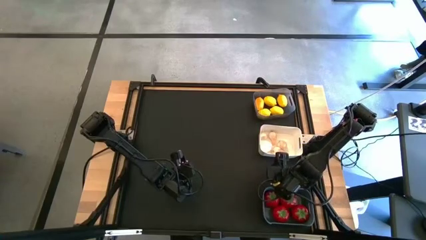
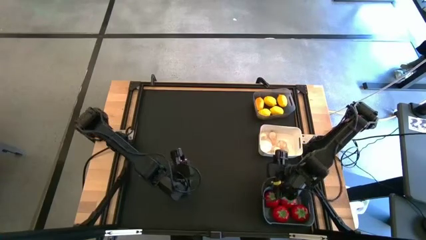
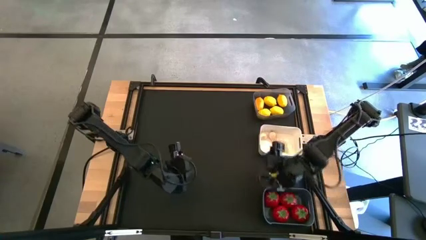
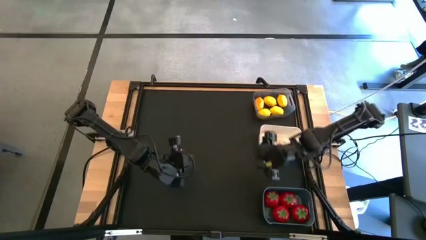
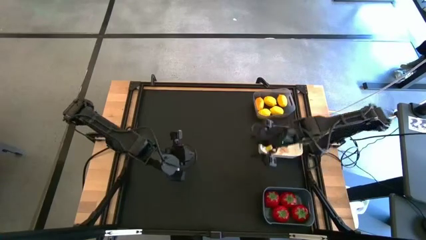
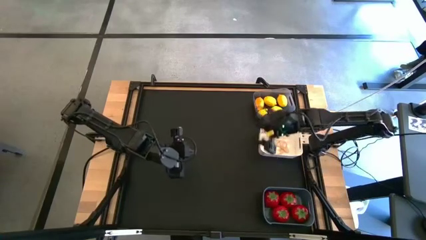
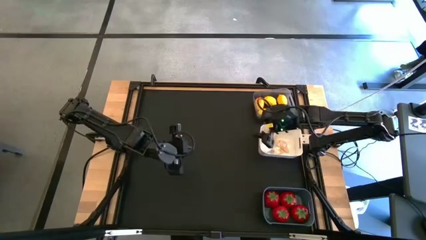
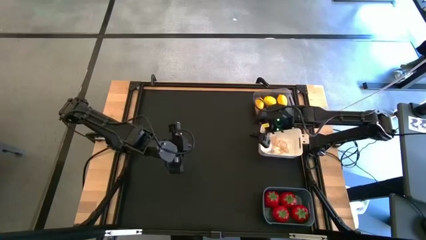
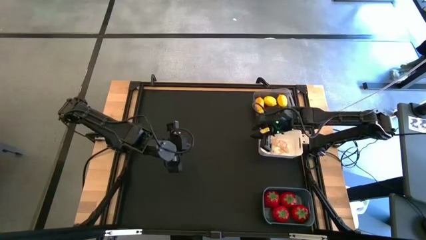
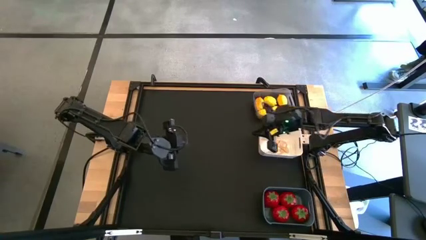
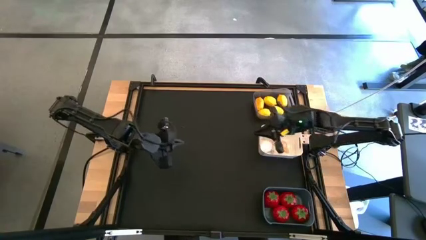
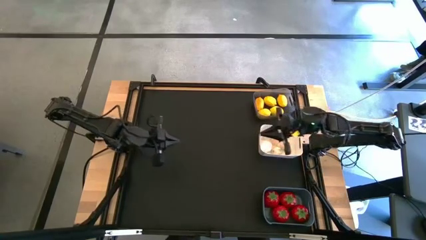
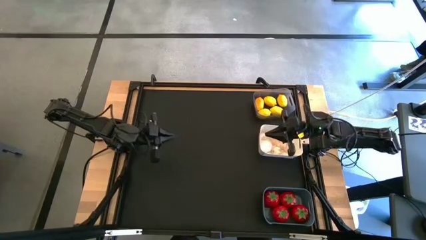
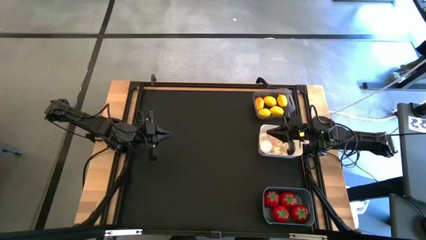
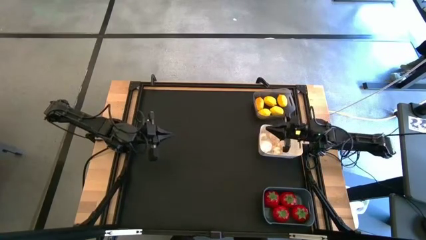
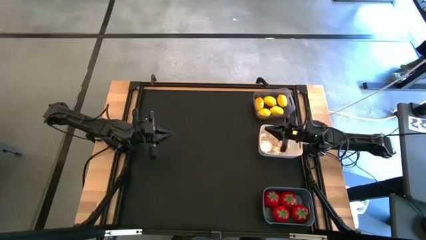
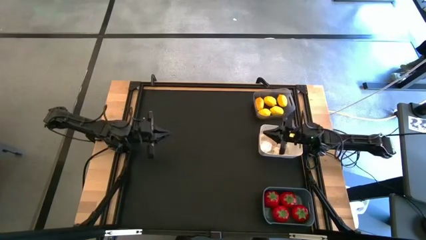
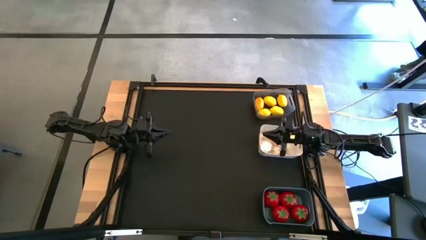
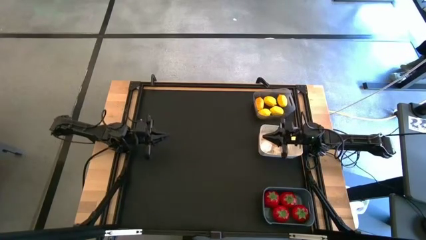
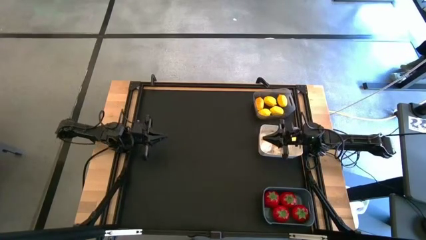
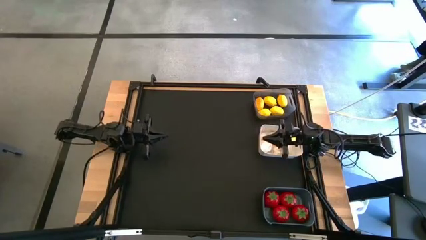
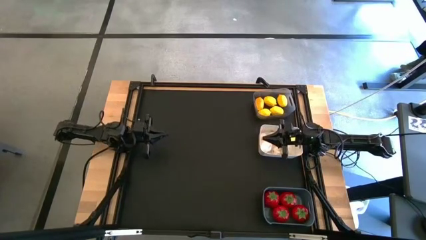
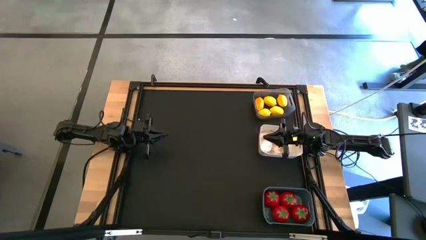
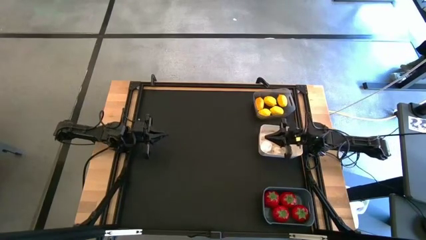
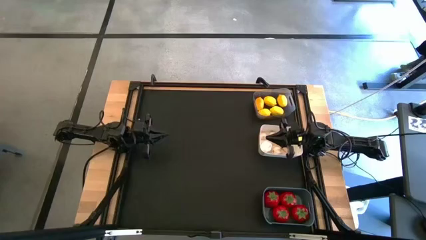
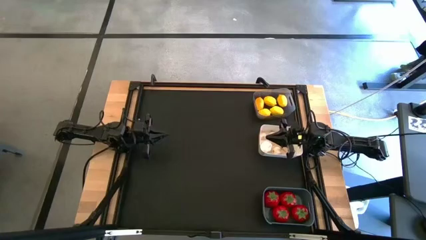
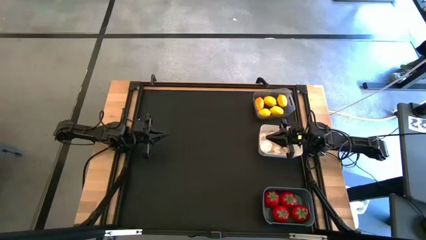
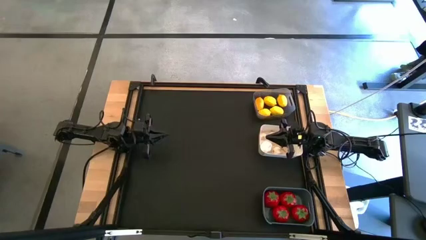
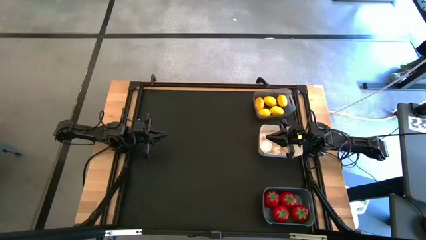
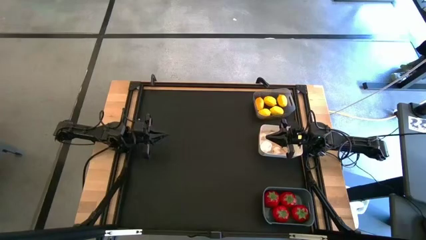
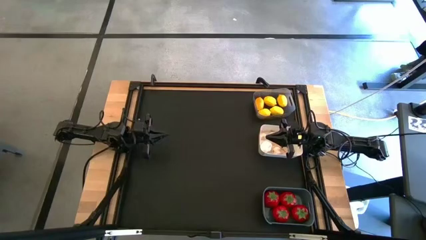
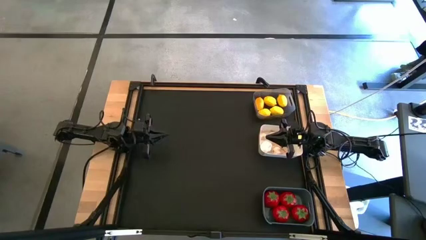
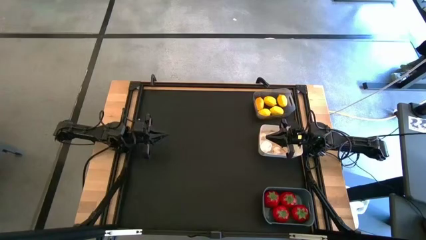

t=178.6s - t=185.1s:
Task: Sort produce into baskets
Return to Home Position

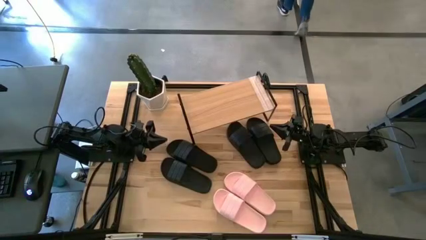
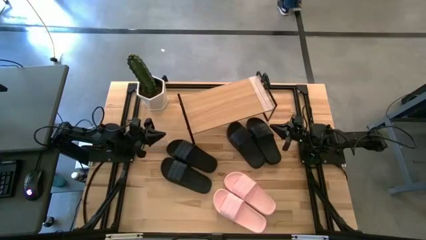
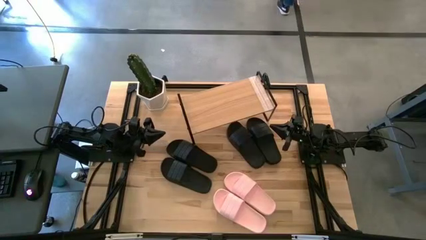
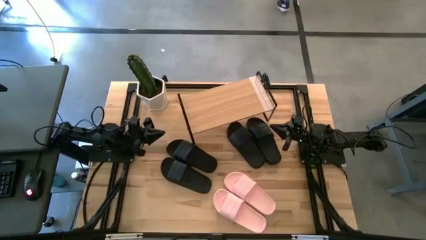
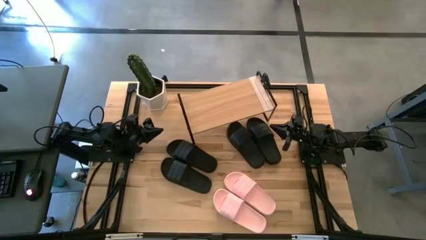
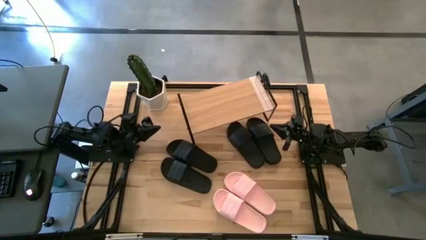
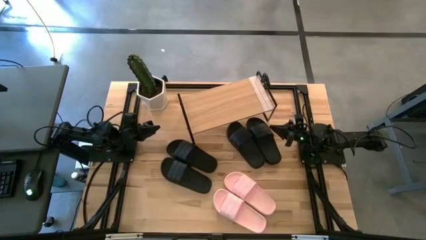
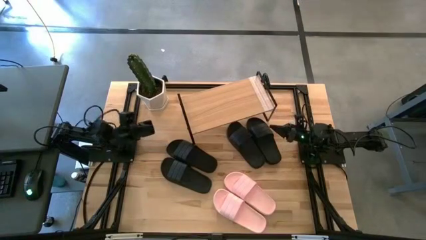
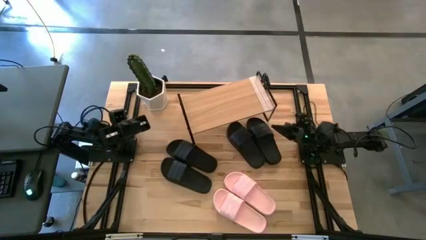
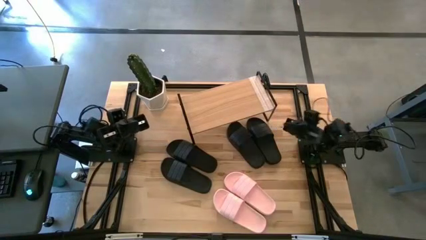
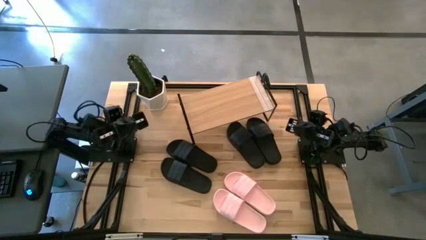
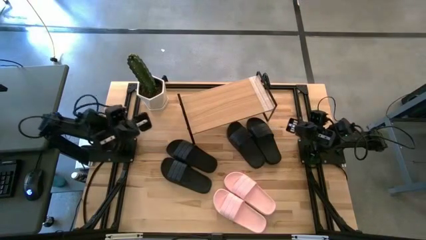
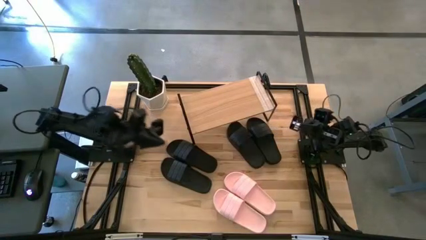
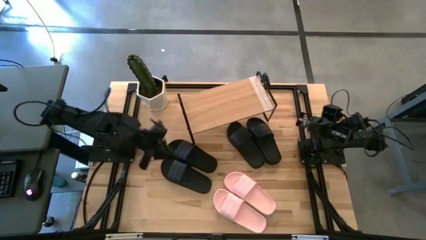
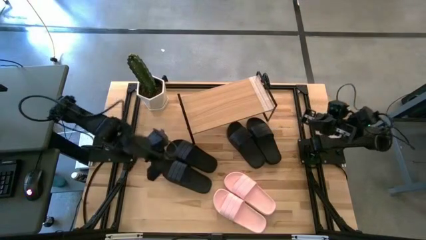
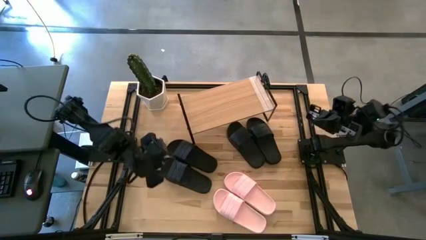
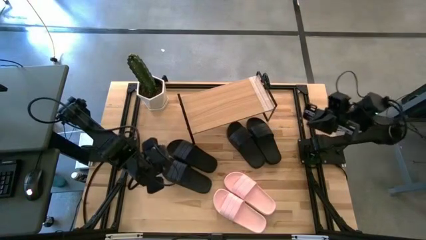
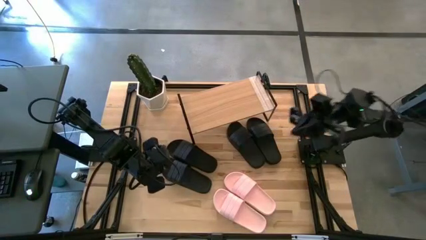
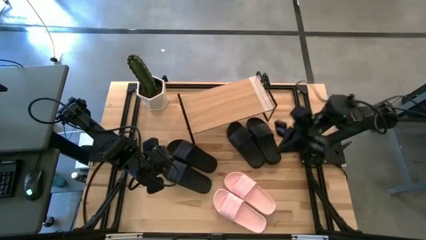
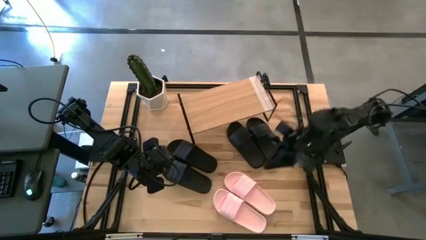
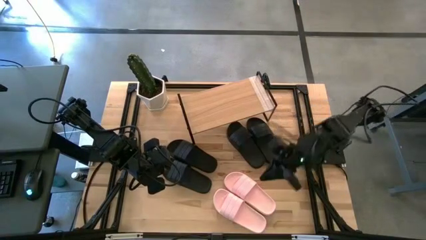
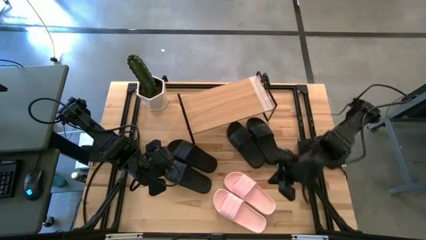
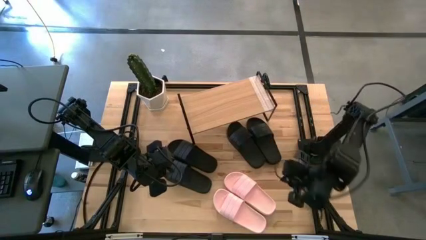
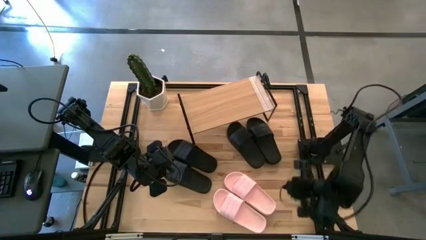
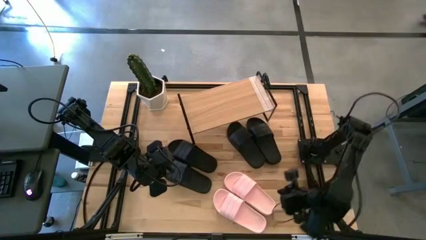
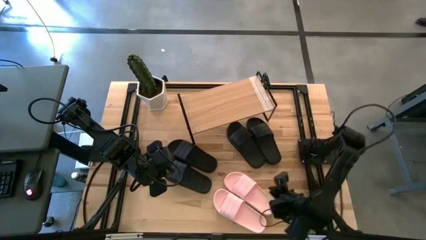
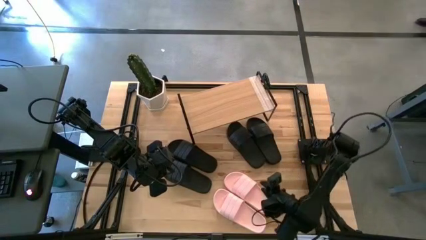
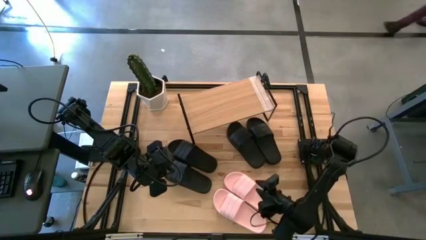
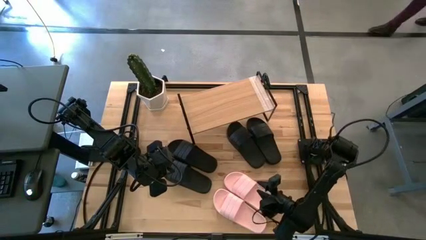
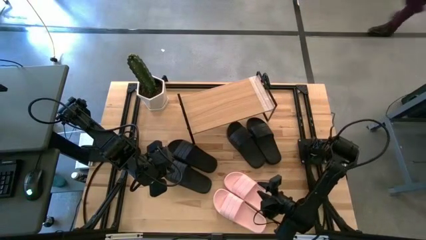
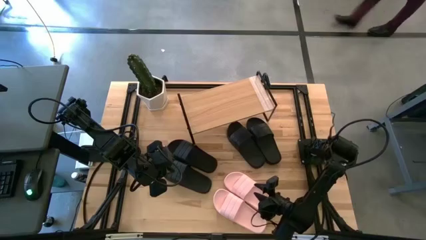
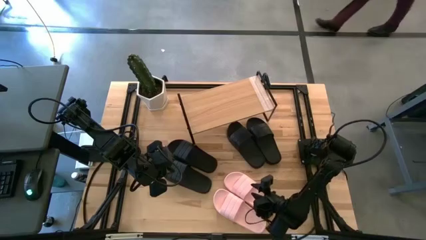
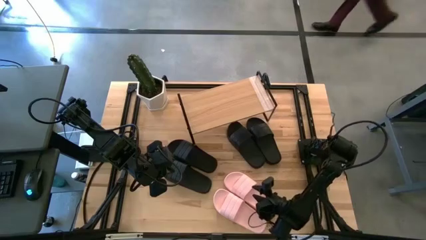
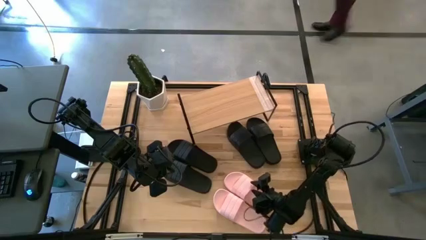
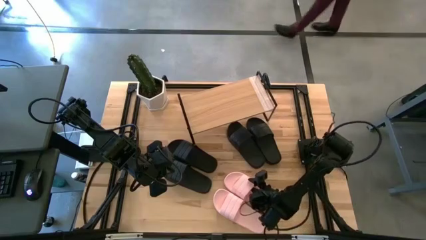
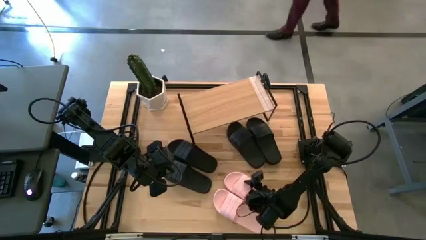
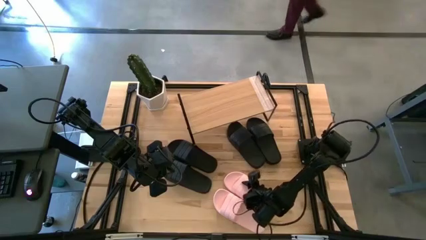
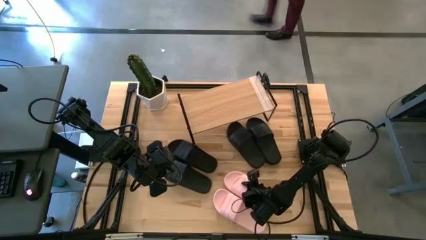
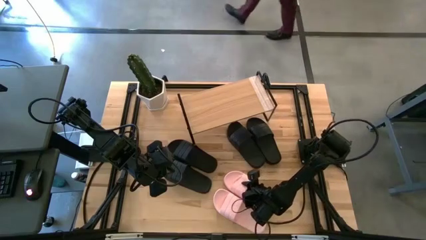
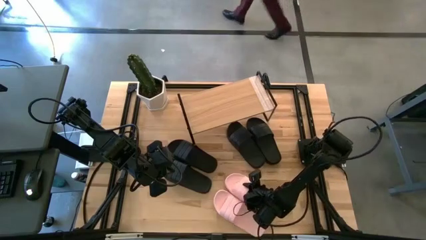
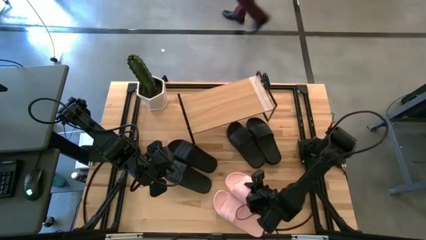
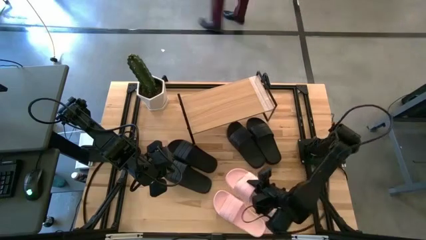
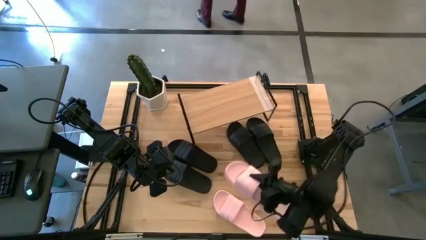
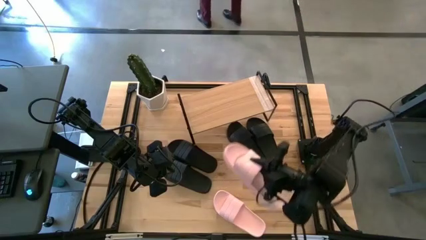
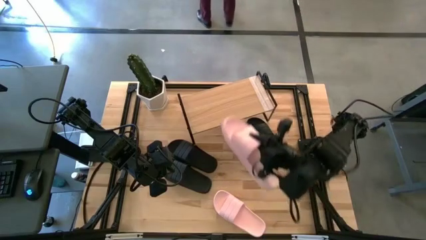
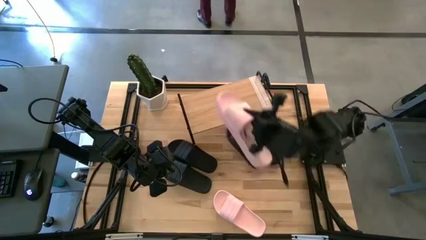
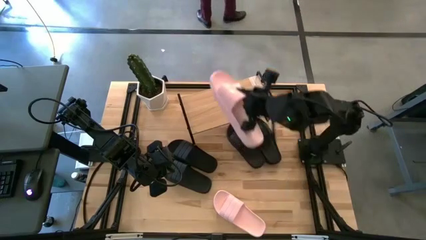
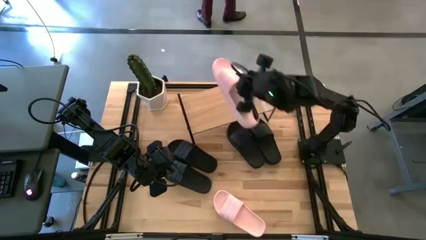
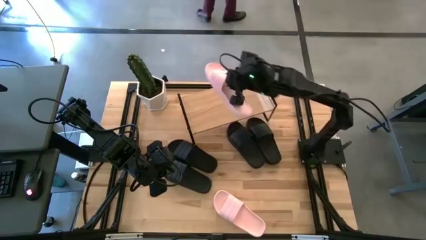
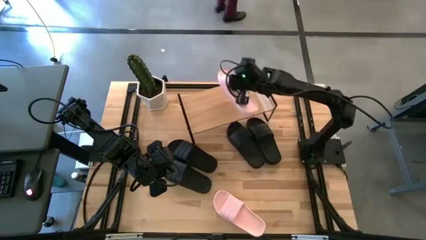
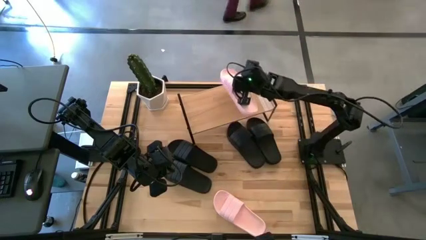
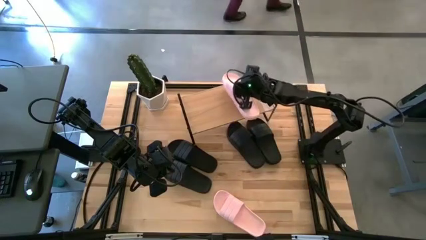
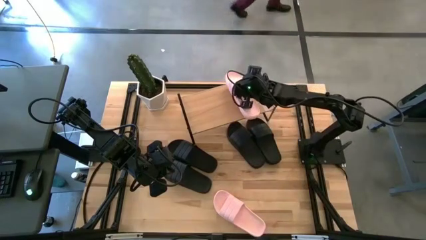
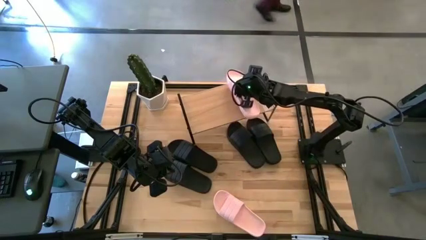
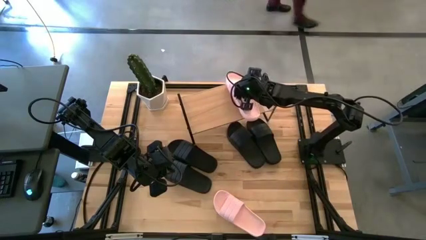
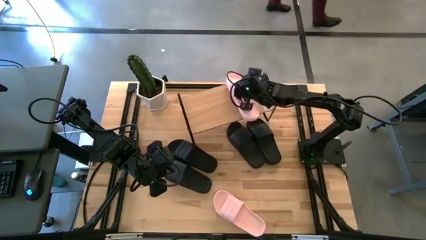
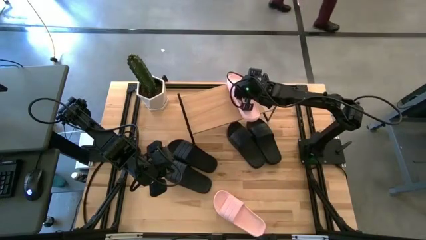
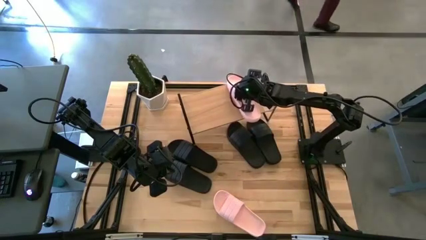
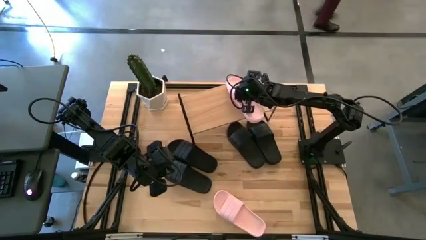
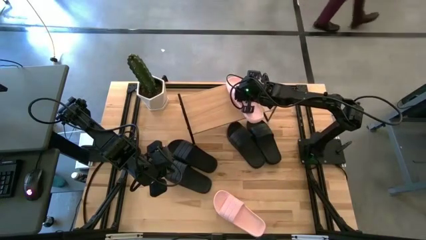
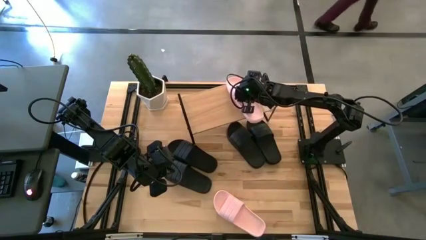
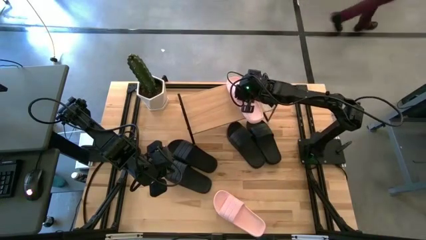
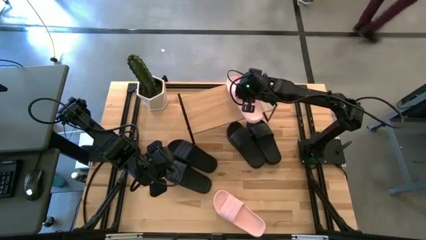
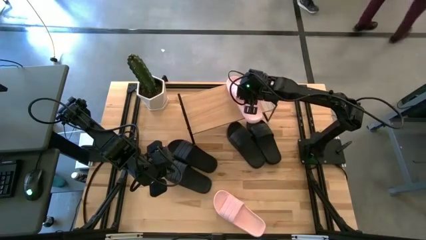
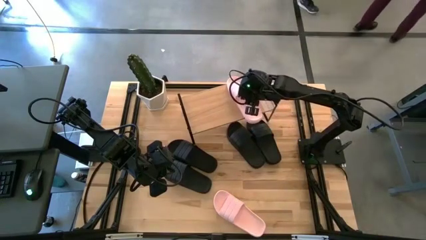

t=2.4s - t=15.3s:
Task: Pick and place slides into the shelf
Put the pink slide on the shelf
